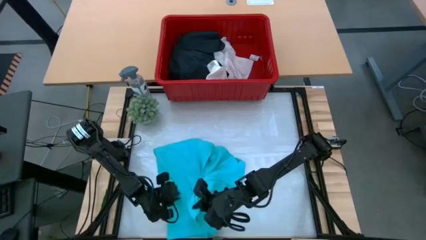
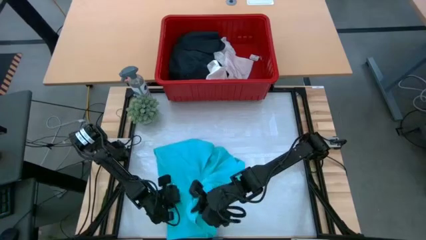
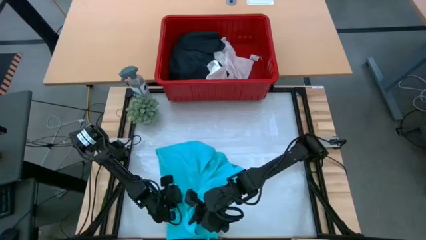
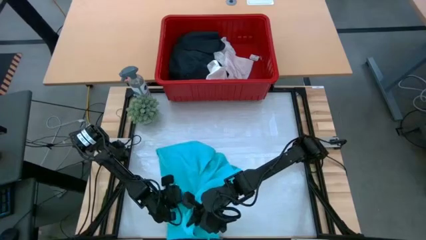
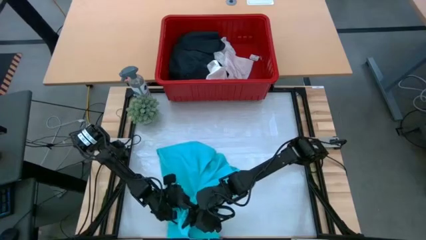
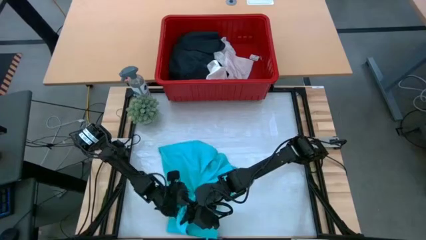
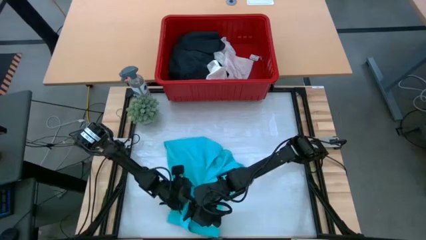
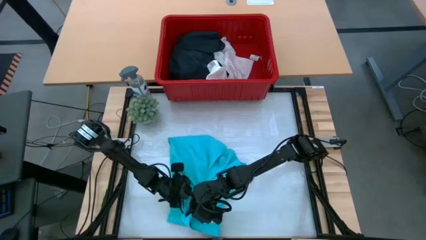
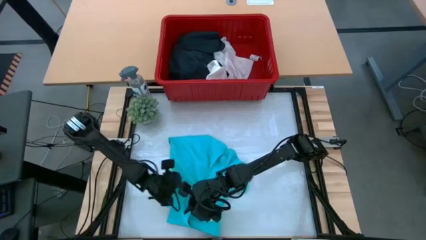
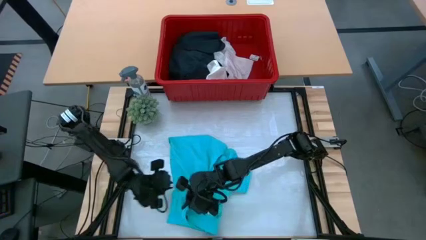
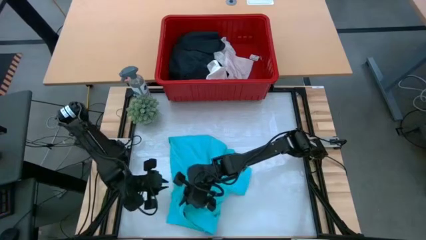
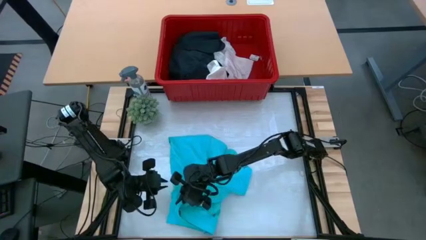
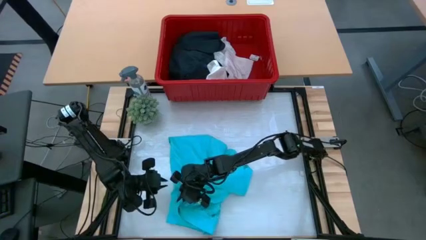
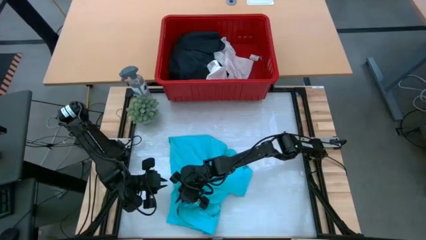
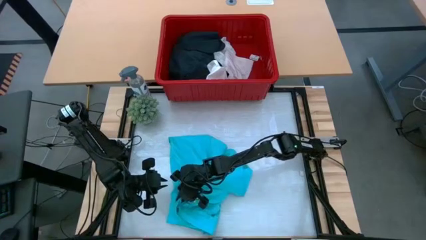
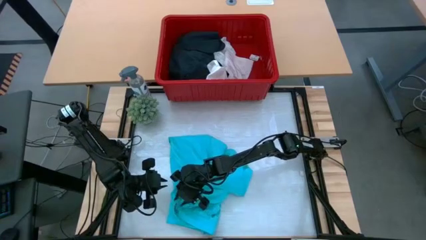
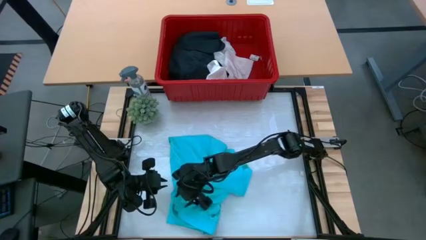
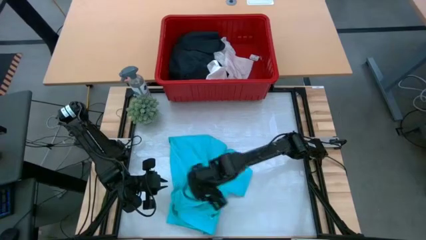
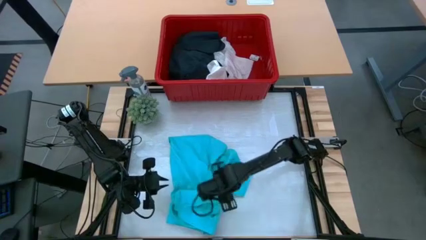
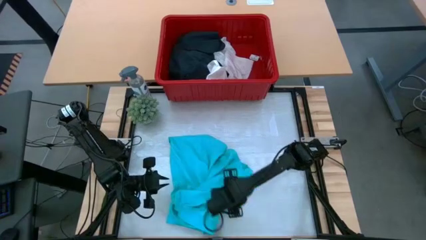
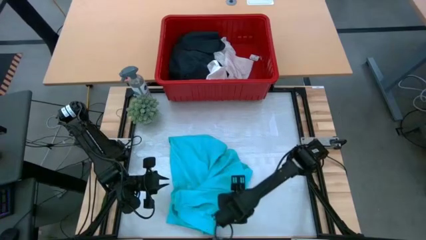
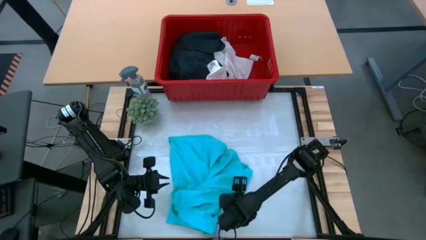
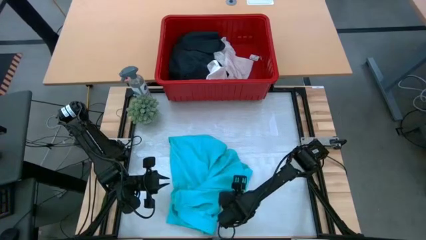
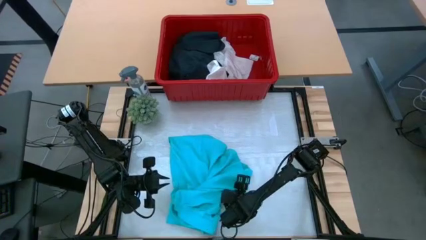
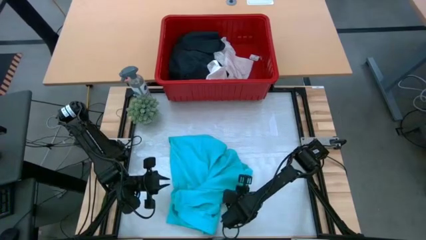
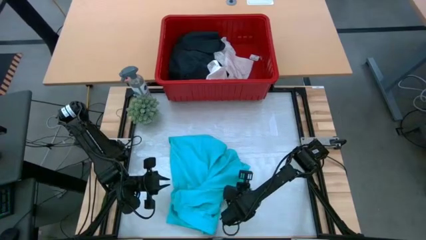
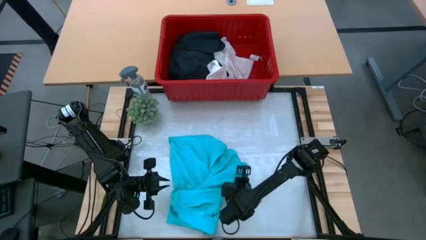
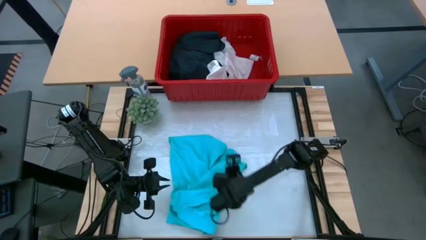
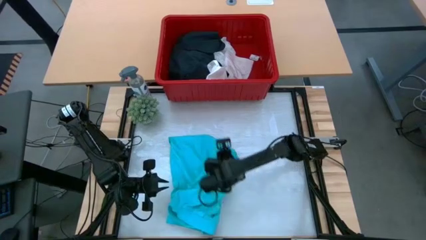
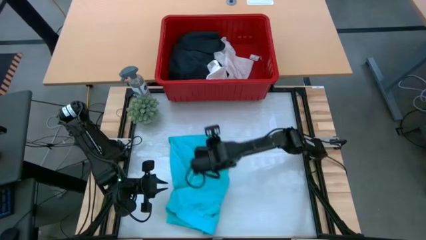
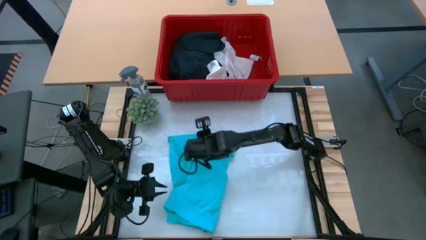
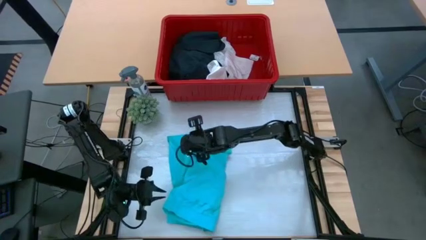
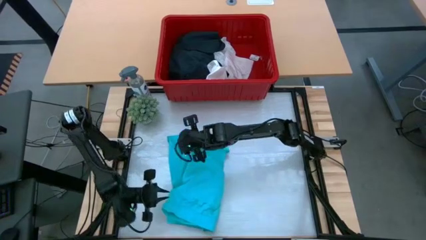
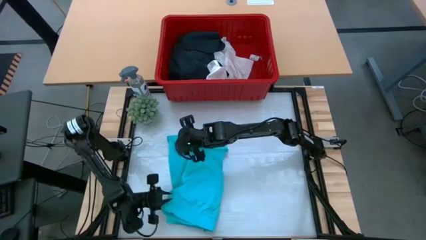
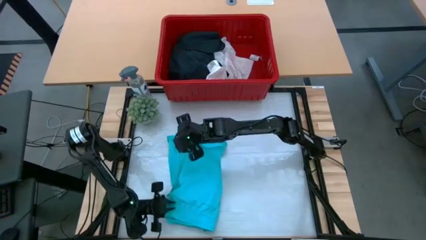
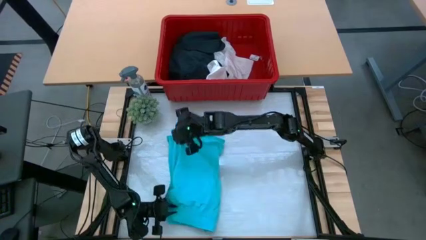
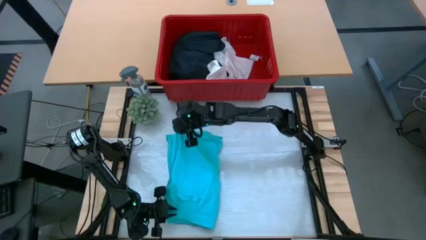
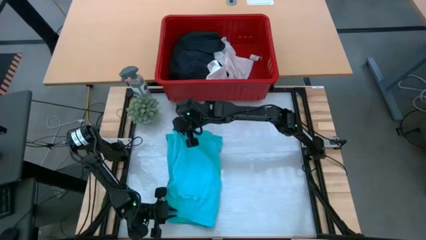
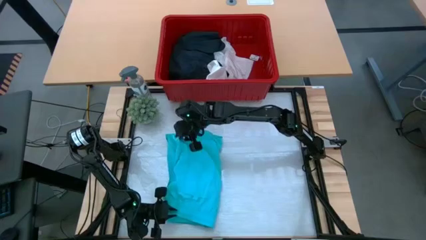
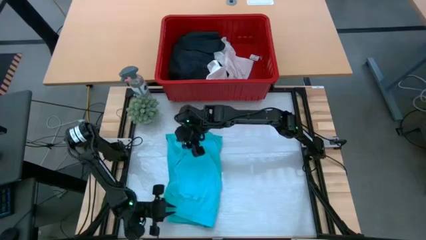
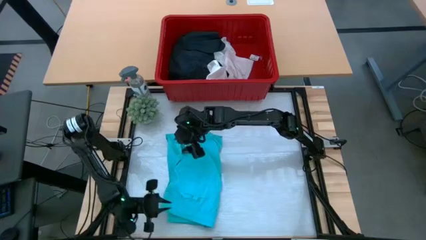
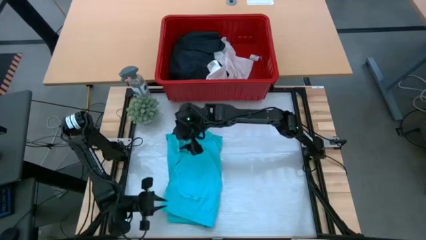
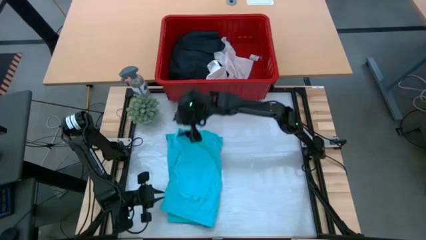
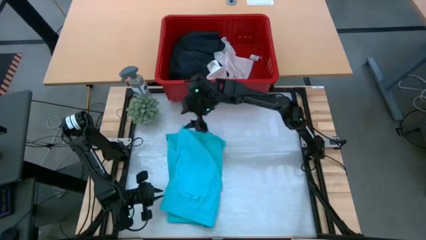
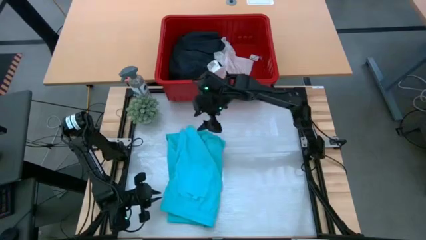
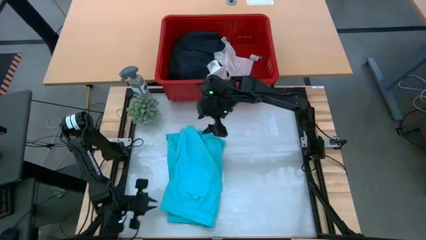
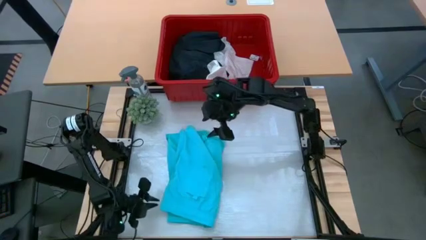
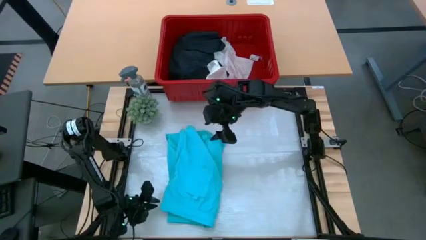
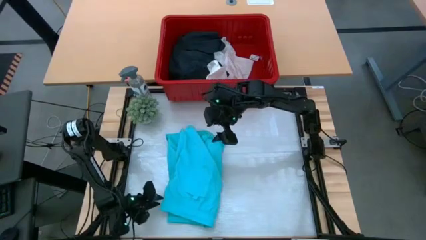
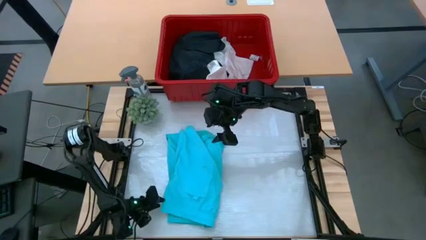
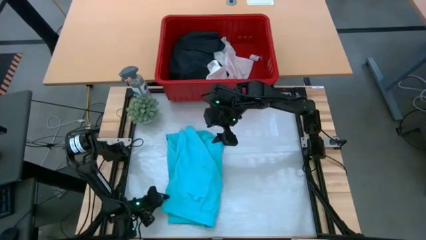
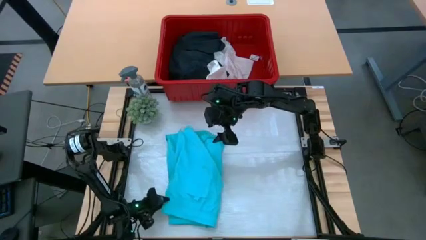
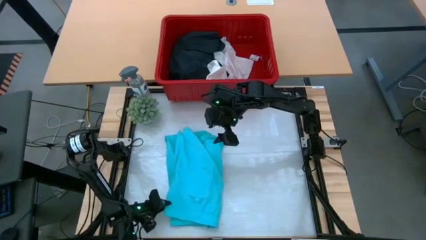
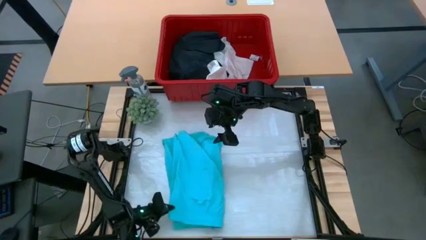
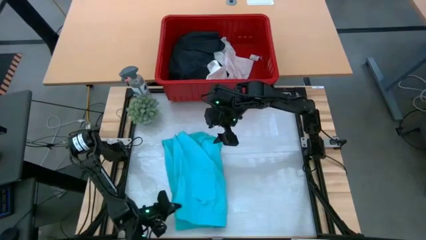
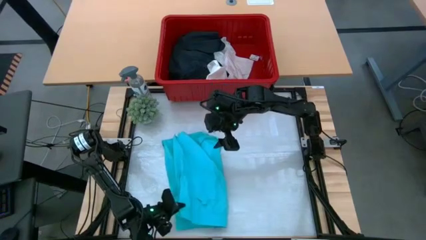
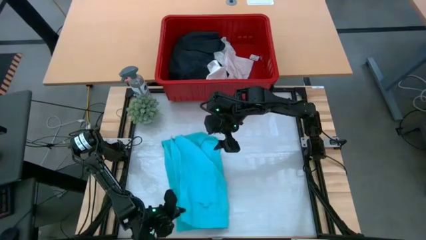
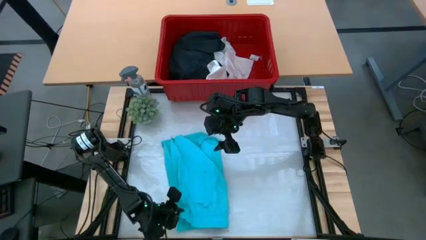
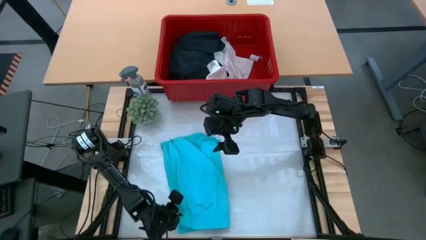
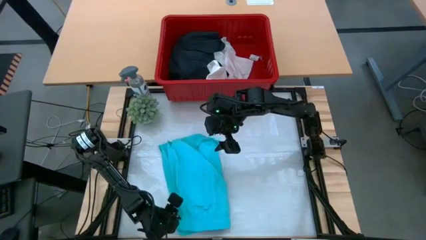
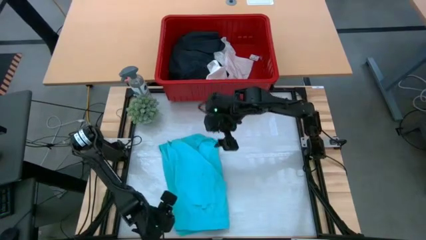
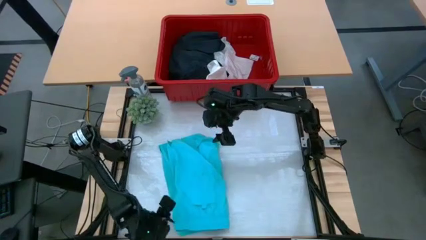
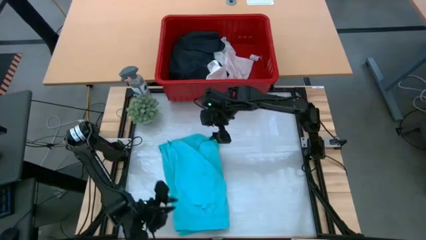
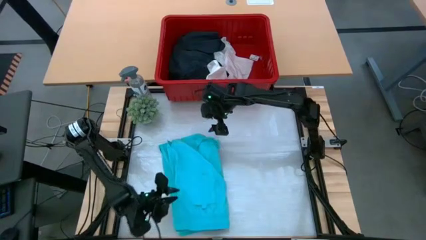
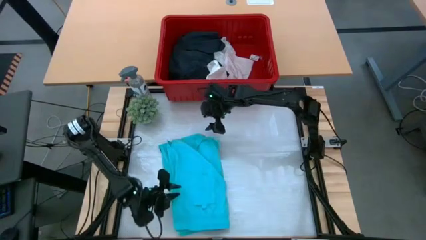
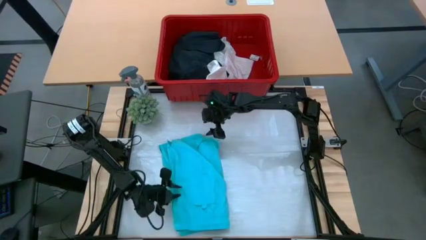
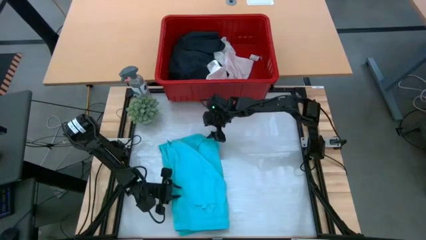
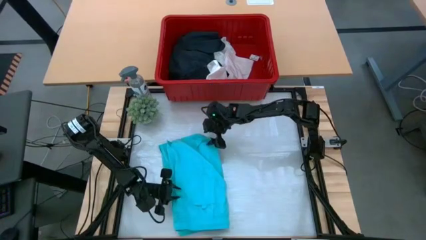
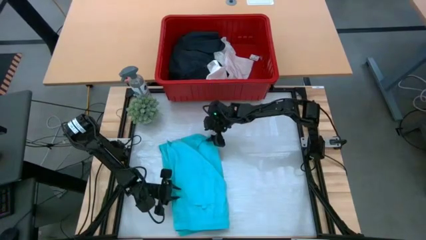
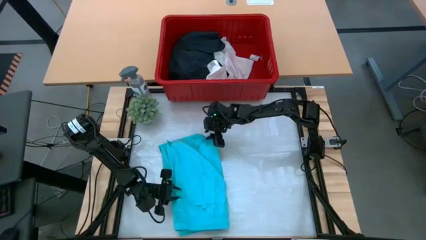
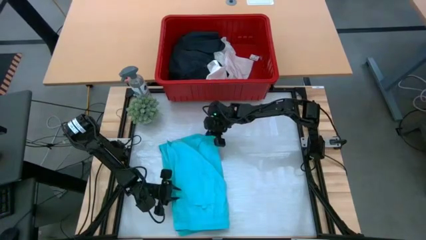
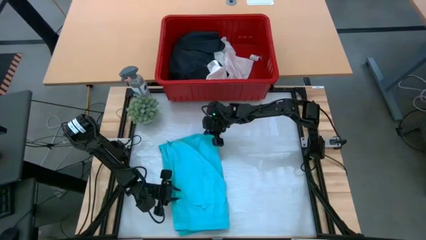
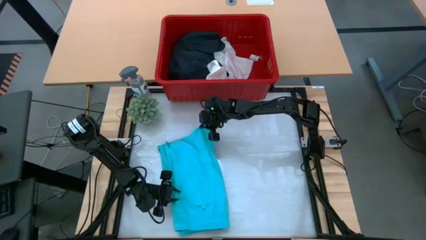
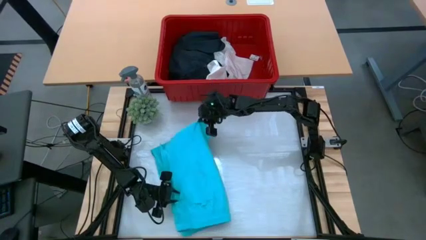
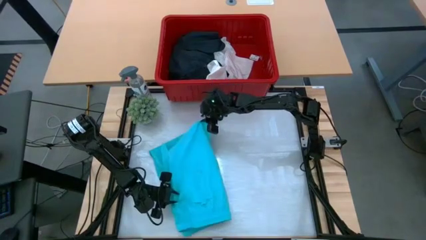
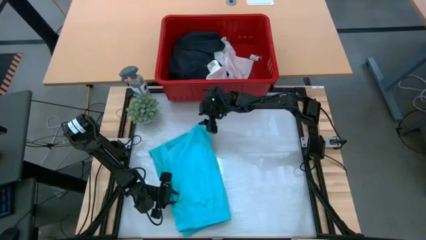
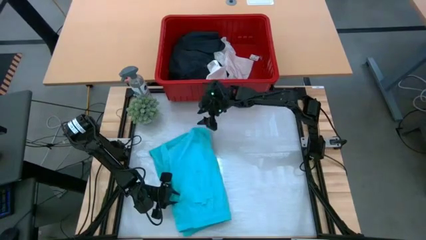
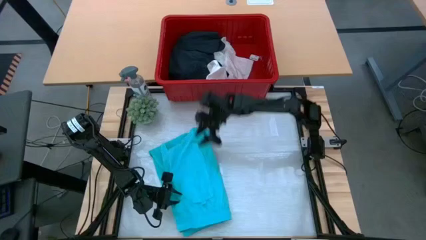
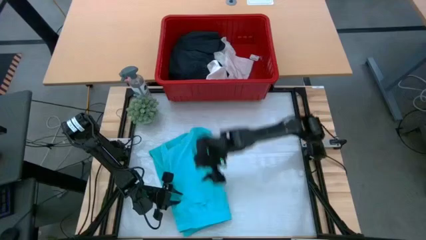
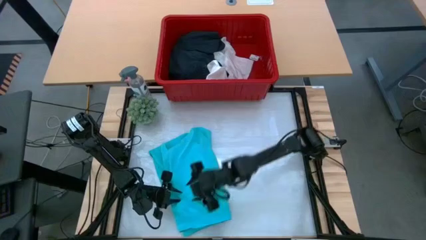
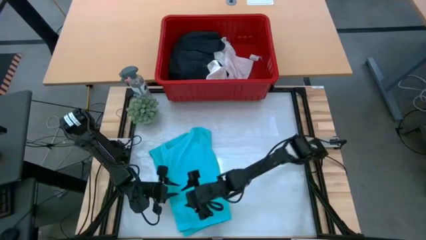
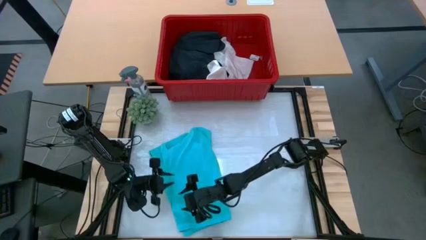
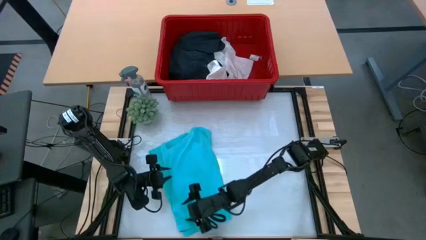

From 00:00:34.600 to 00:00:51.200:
Task: Fold Laundry from Bin
Fold the blue shorts
